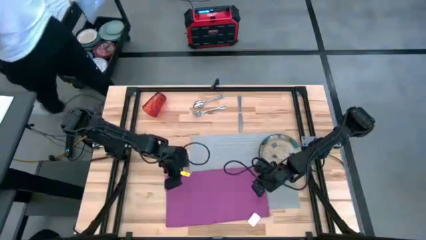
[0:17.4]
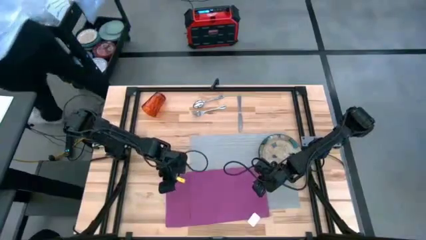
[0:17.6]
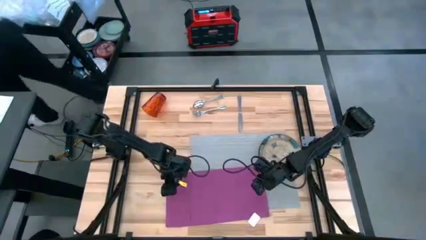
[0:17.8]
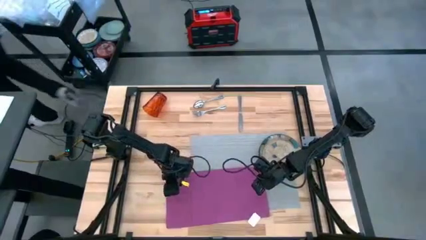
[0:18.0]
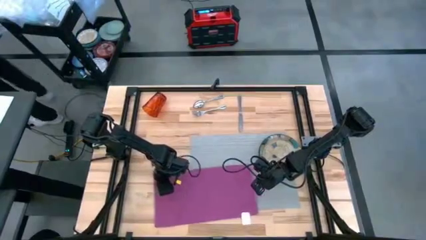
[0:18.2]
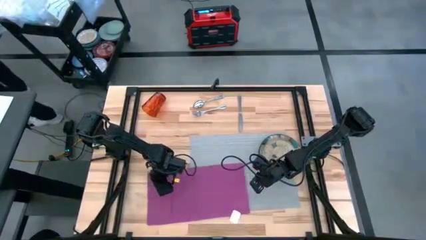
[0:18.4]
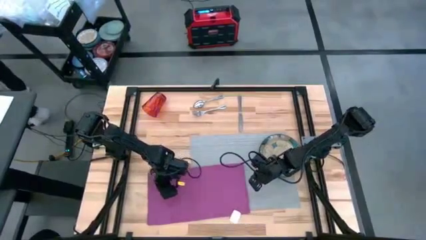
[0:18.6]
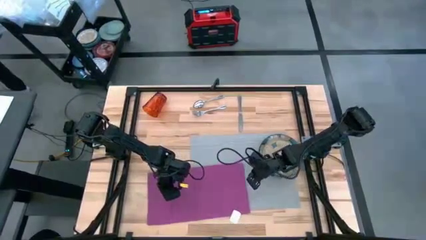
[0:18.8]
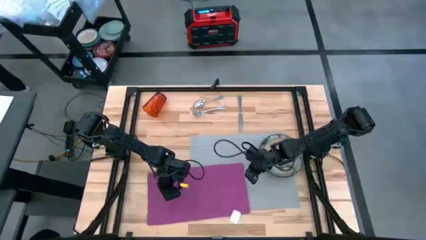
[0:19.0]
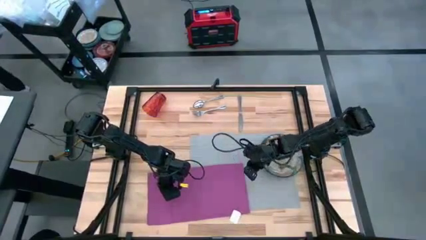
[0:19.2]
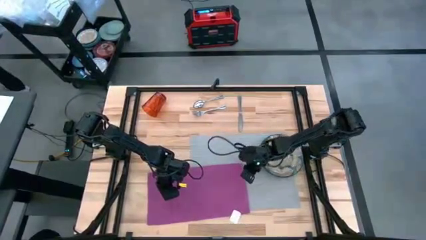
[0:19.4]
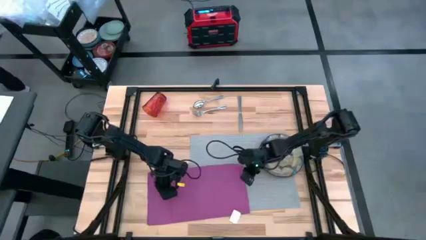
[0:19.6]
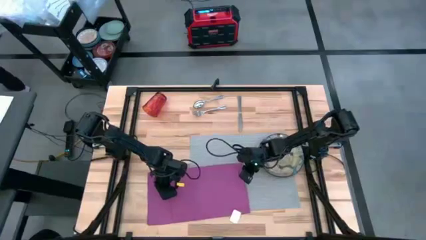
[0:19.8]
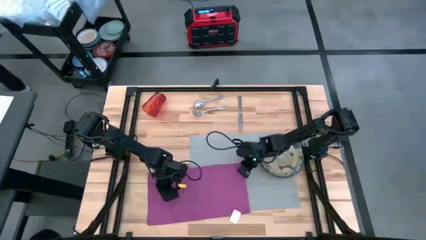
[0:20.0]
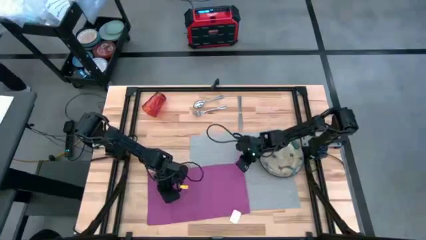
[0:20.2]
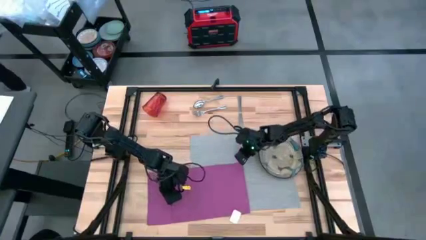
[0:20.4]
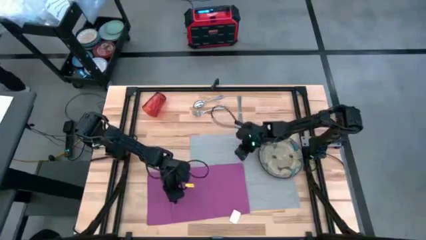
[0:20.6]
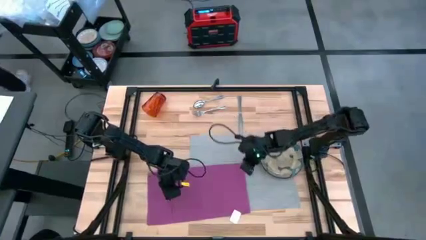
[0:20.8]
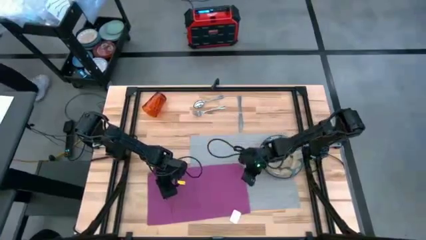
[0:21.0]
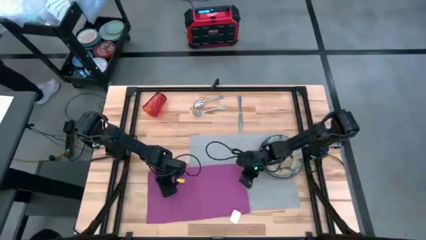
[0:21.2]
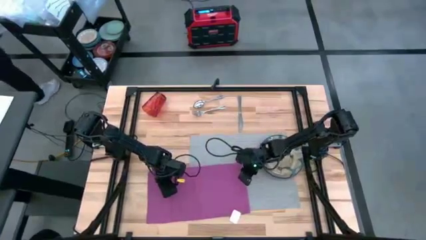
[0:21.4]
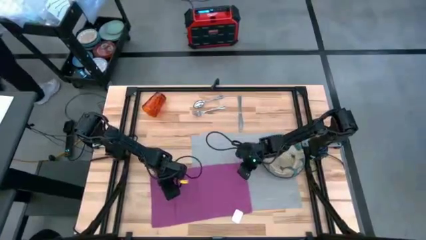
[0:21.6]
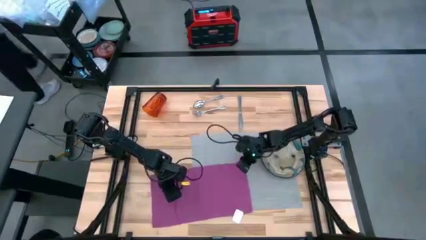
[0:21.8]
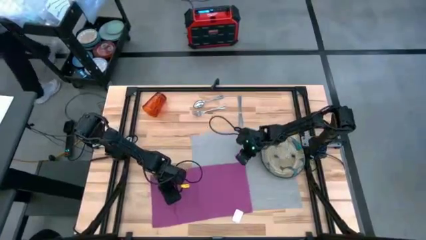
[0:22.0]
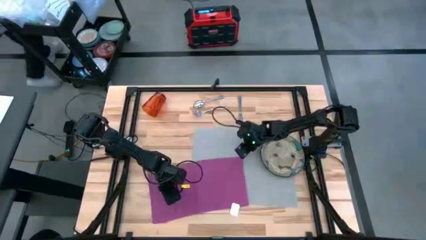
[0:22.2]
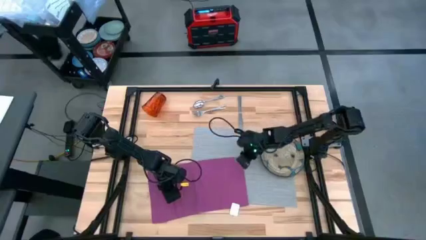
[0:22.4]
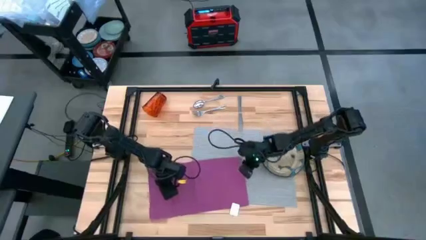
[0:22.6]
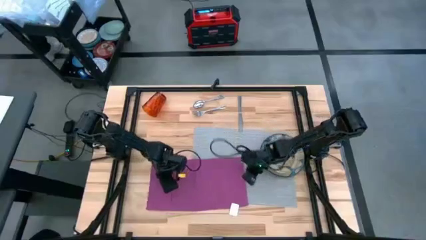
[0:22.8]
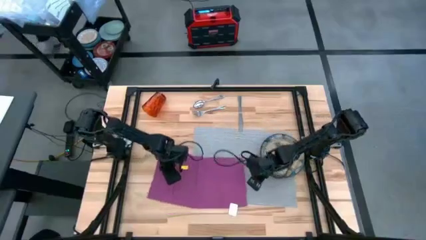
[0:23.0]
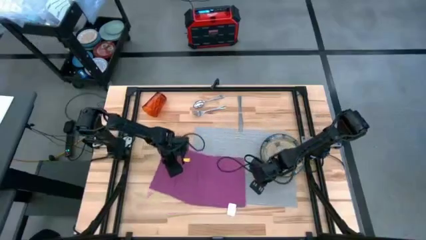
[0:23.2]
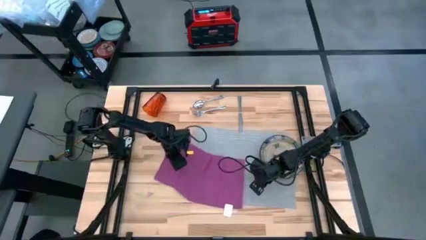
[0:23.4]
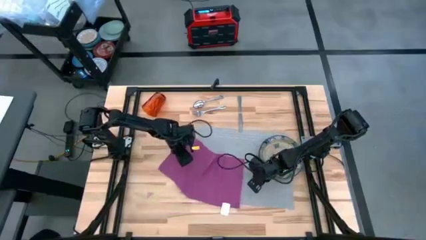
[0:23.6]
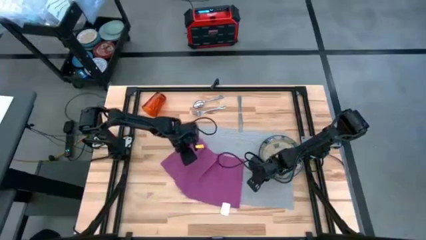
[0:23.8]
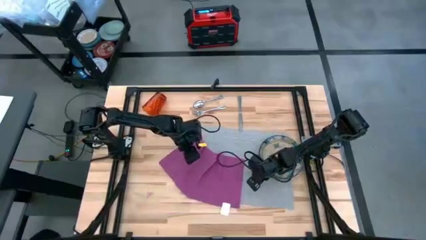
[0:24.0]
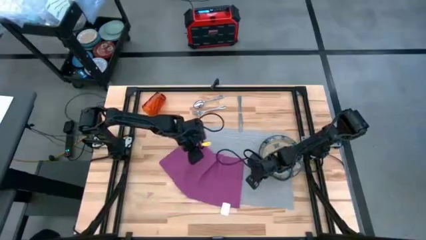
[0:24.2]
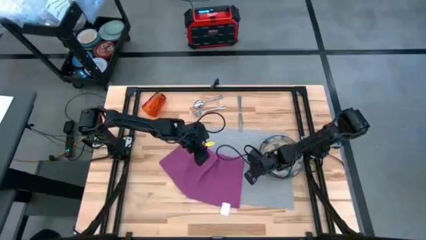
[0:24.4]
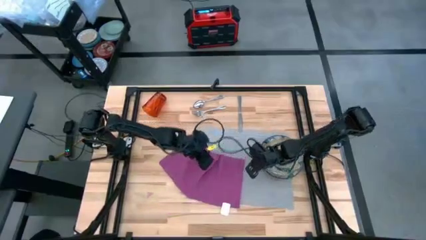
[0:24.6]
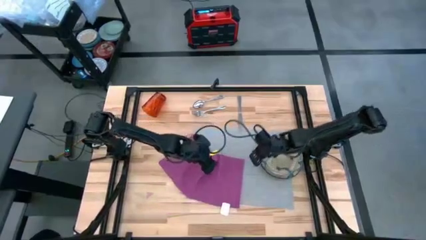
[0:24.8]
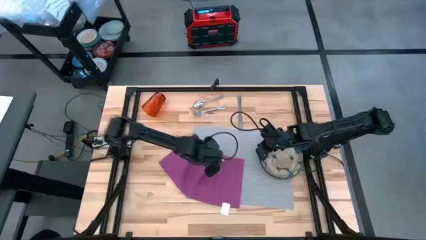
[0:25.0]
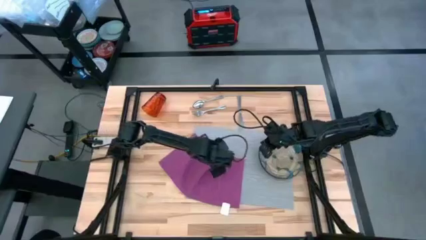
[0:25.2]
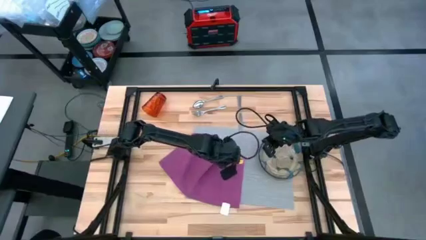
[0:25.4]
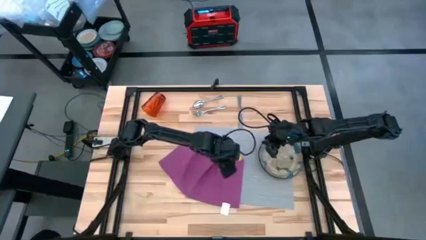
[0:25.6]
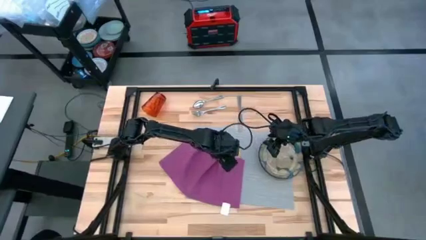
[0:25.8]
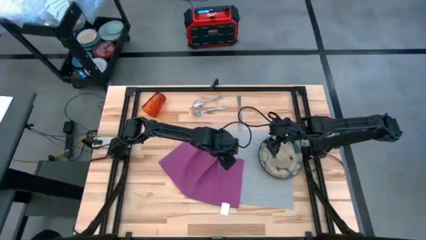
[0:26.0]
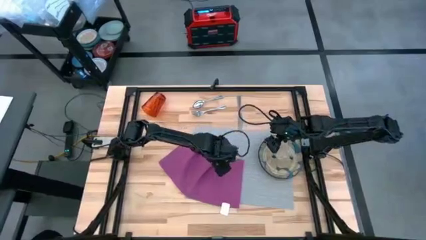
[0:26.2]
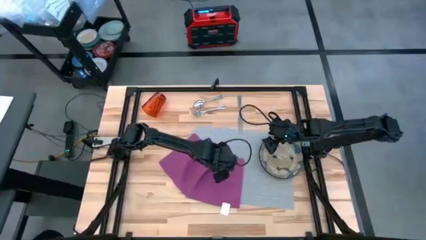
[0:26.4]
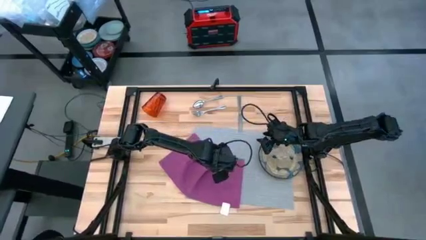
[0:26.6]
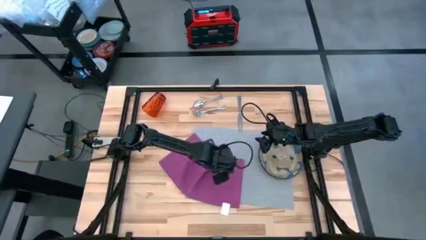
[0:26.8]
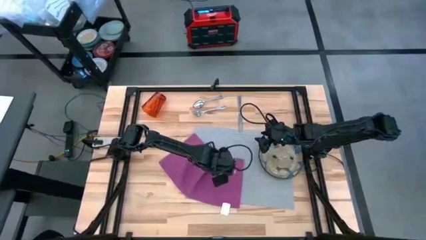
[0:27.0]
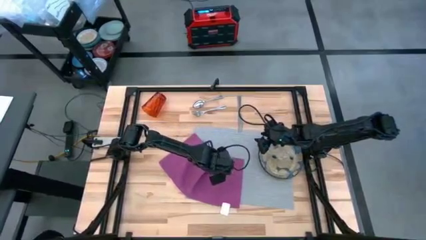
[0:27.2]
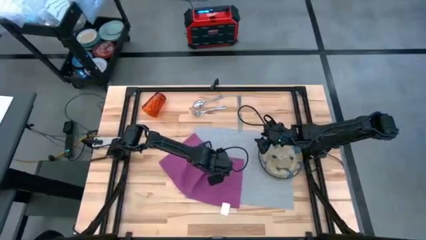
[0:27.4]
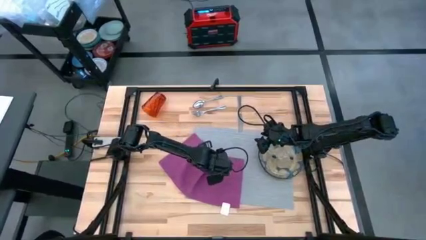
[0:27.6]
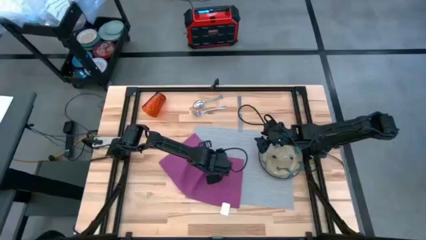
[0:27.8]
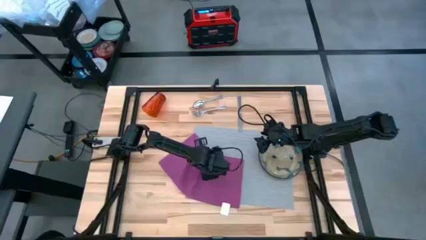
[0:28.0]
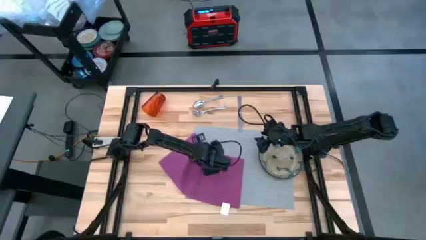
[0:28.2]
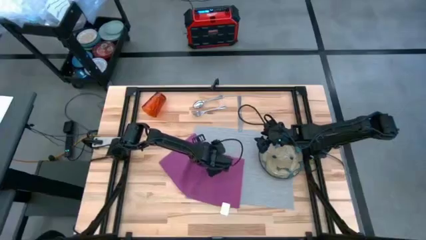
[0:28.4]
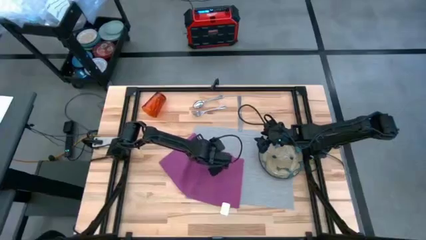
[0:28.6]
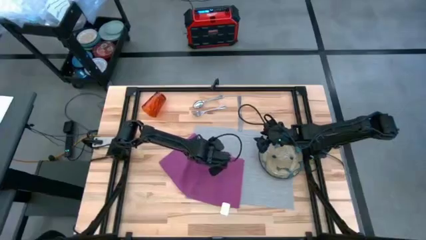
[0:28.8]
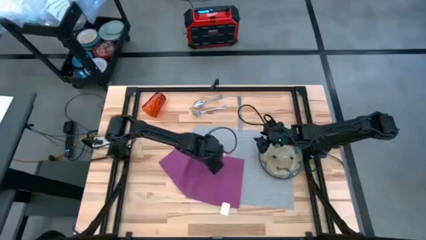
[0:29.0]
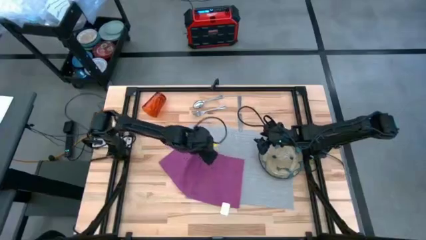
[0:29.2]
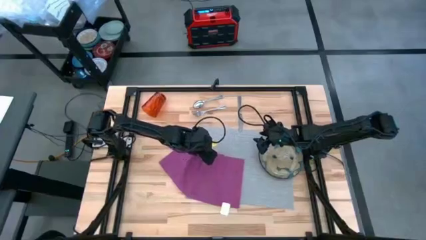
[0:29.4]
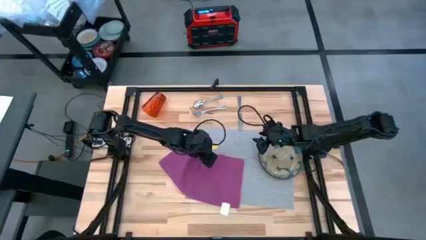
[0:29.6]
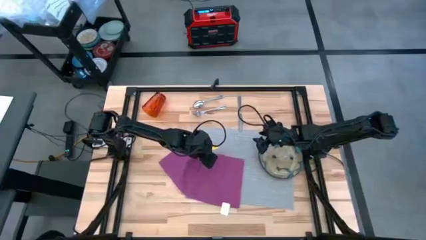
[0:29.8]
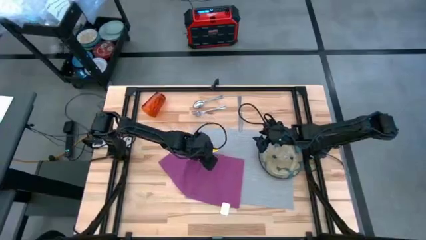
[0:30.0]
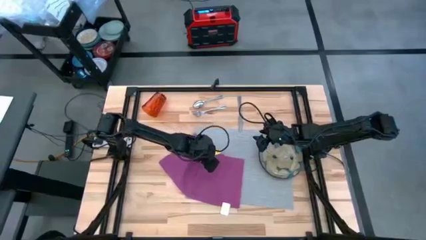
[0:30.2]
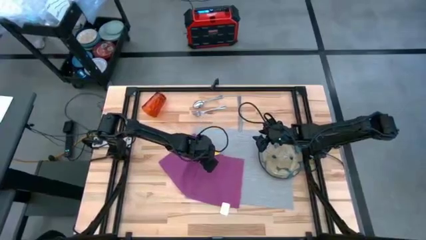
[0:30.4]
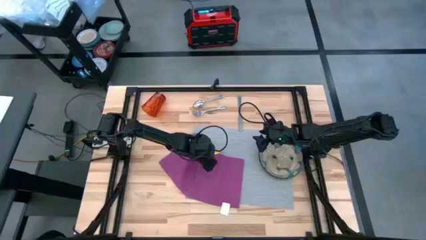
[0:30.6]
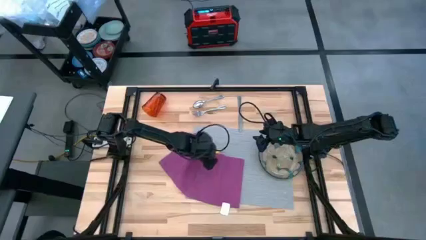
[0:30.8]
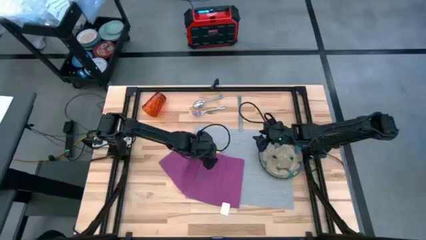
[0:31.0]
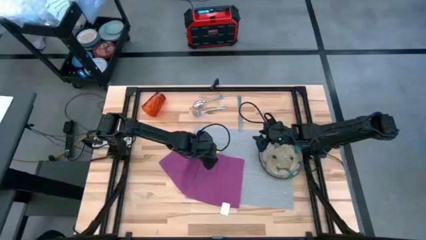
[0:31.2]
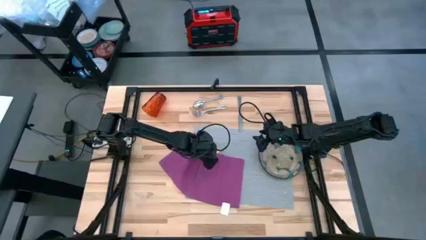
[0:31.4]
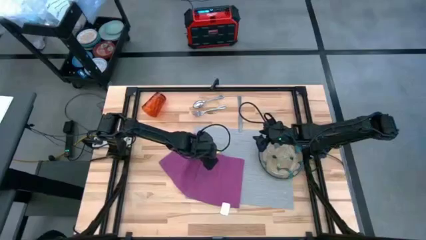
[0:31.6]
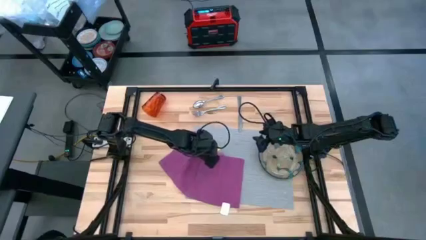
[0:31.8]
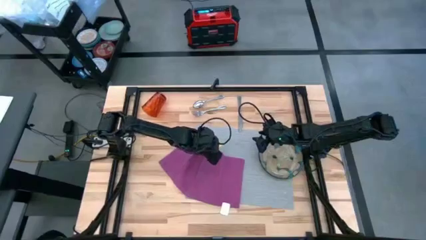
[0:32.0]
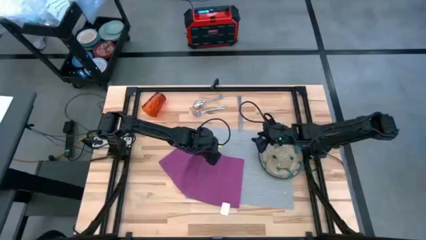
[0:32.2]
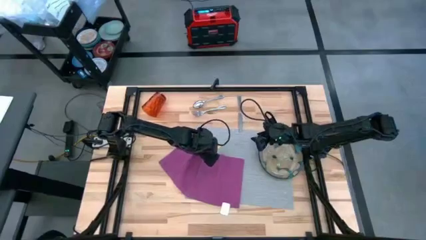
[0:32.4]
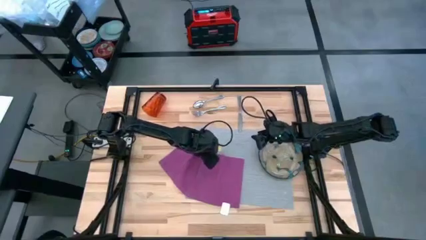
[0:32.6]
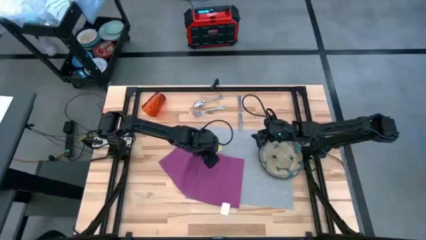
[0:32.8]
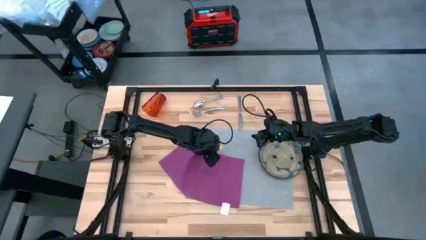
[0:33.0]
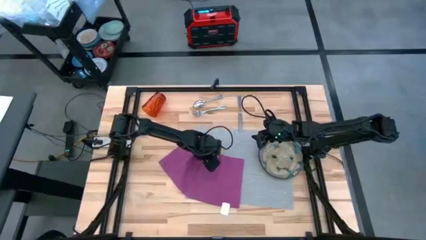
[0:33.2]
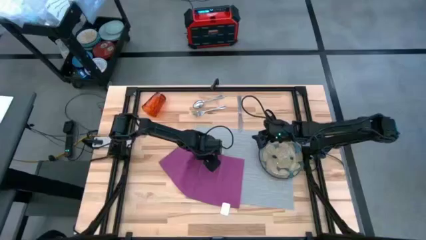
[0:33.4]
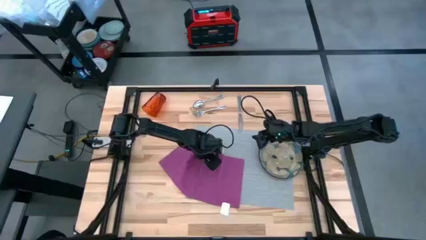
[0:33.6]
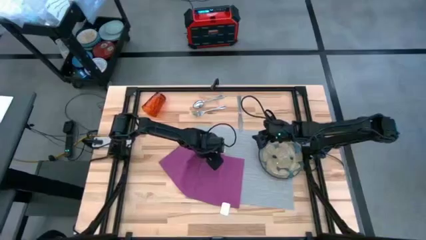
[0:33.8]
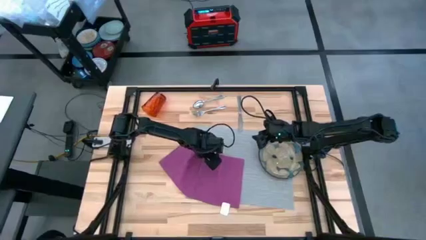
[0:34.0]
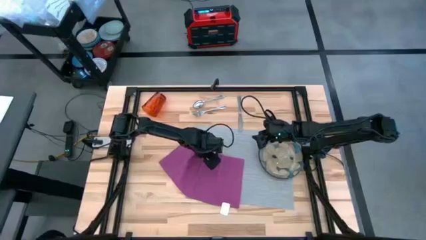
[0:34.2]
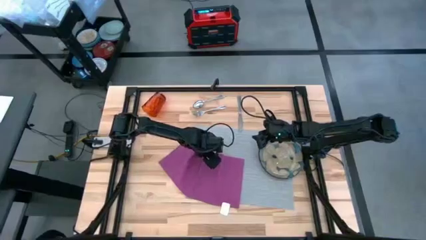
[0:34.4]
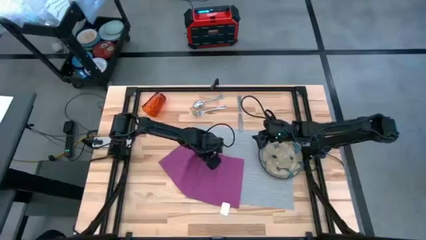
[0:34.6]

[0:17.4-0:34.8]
Task: Set table place
Fold the violet table napkin
